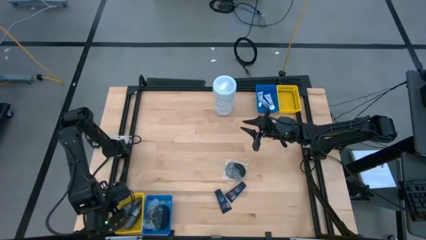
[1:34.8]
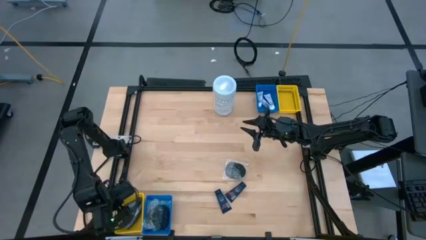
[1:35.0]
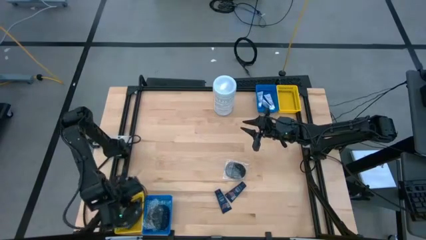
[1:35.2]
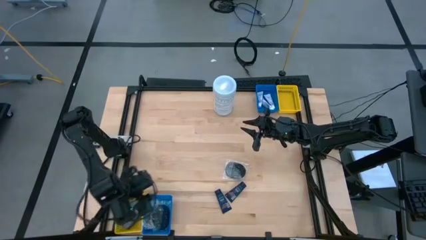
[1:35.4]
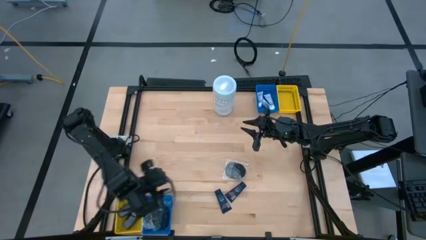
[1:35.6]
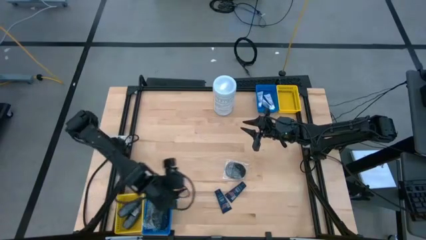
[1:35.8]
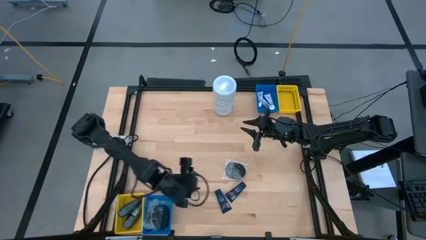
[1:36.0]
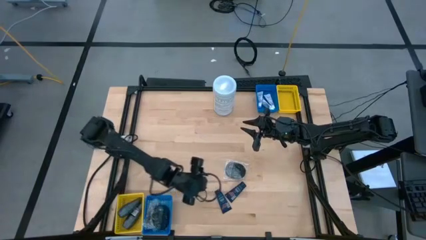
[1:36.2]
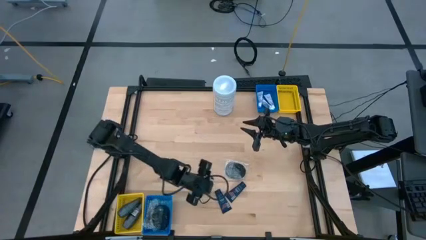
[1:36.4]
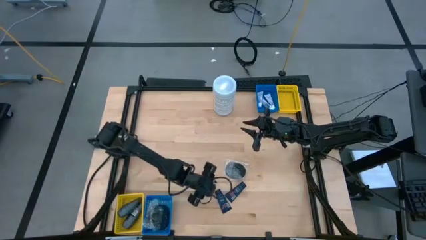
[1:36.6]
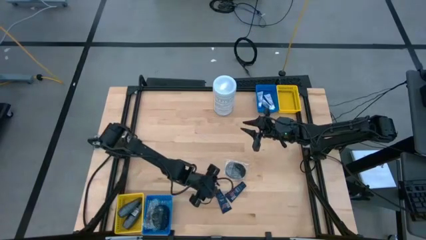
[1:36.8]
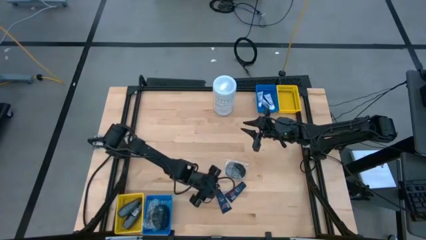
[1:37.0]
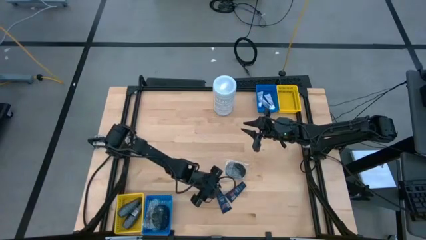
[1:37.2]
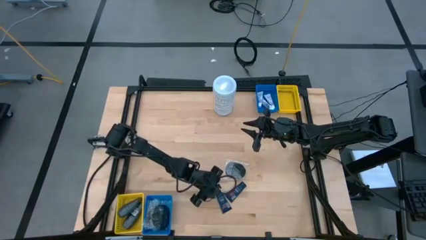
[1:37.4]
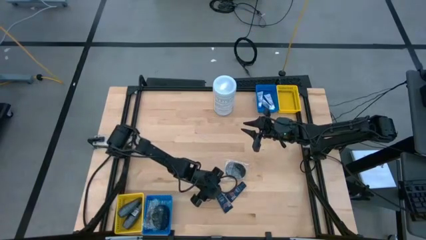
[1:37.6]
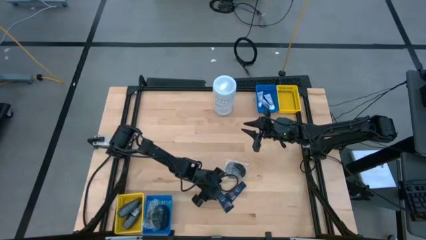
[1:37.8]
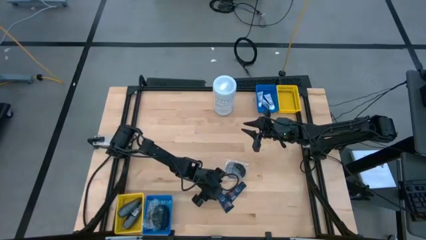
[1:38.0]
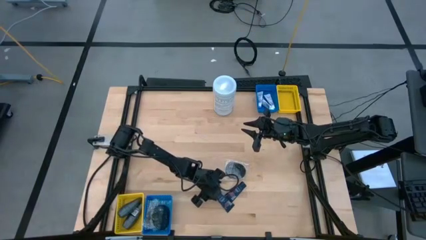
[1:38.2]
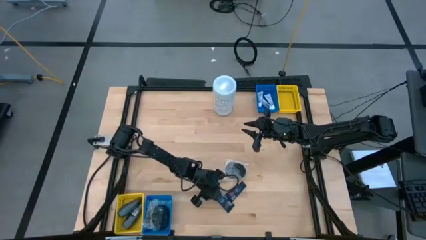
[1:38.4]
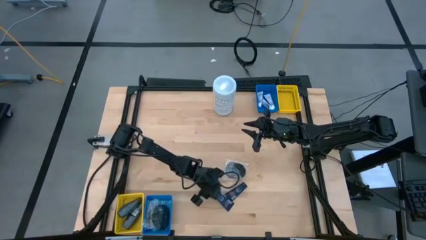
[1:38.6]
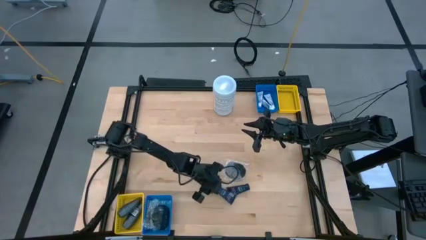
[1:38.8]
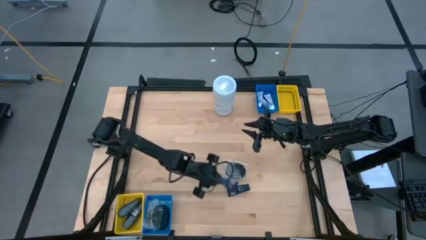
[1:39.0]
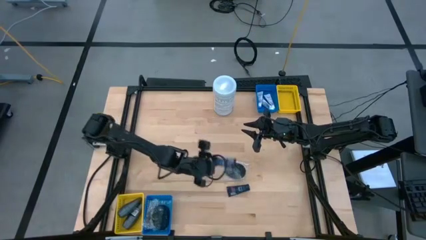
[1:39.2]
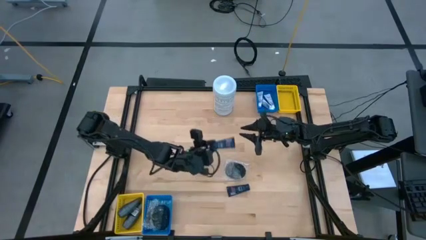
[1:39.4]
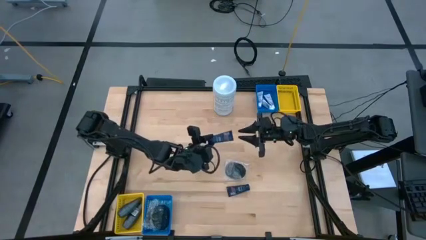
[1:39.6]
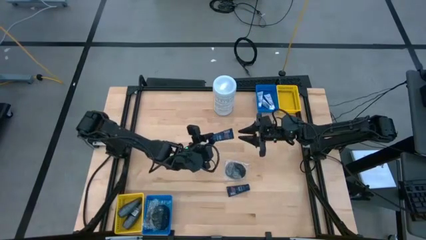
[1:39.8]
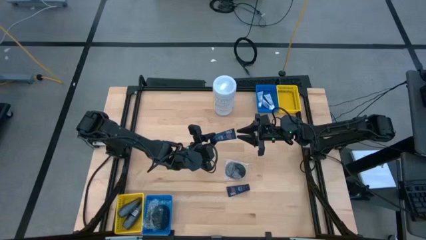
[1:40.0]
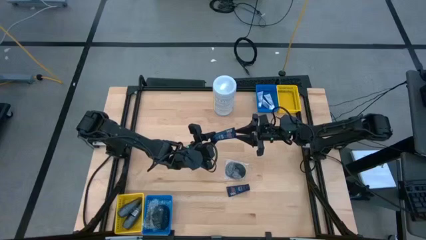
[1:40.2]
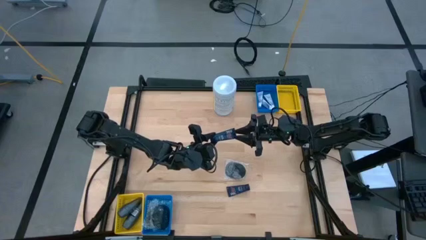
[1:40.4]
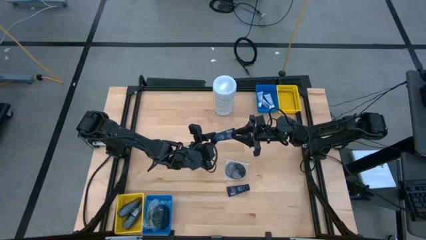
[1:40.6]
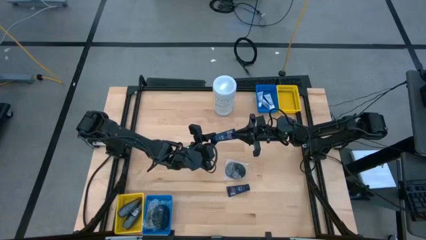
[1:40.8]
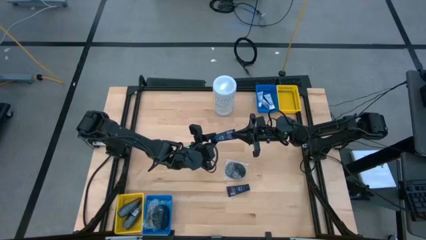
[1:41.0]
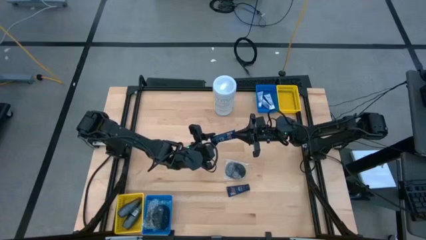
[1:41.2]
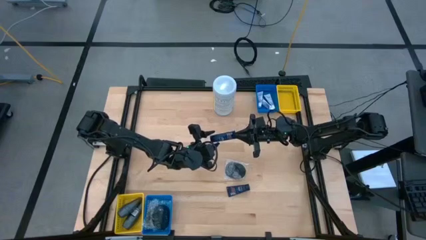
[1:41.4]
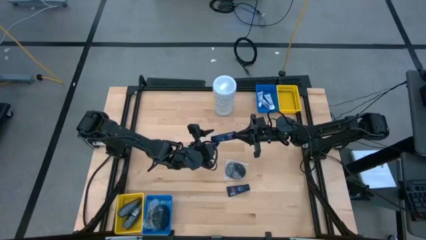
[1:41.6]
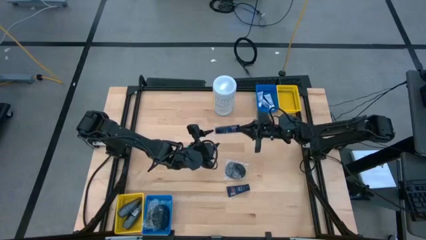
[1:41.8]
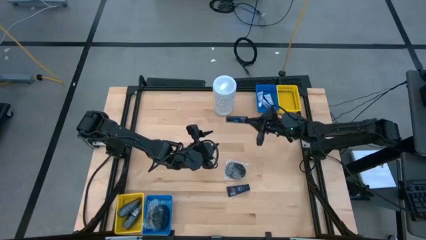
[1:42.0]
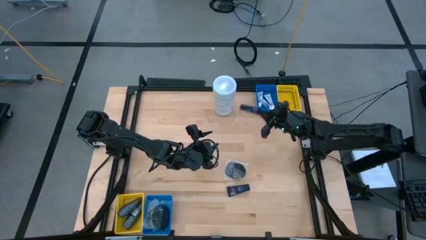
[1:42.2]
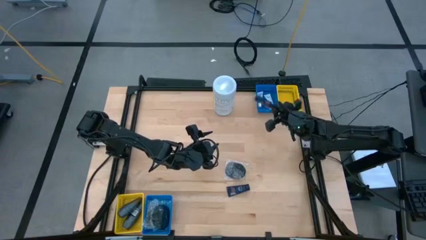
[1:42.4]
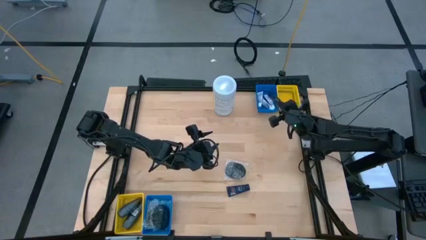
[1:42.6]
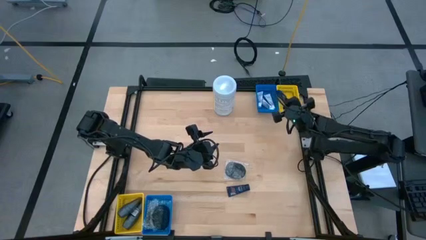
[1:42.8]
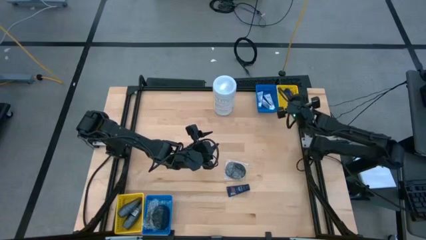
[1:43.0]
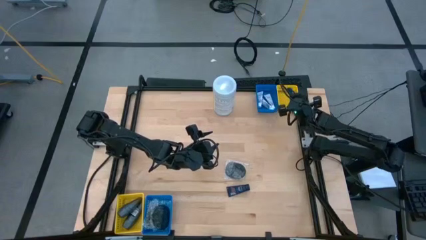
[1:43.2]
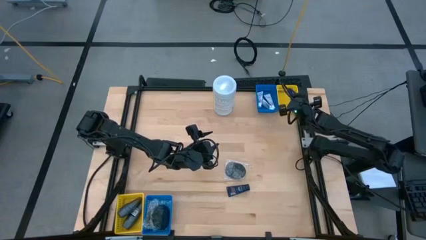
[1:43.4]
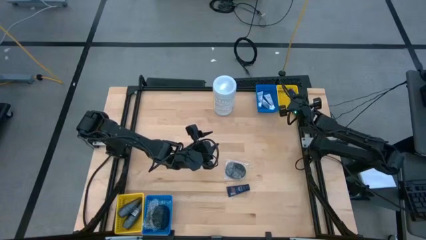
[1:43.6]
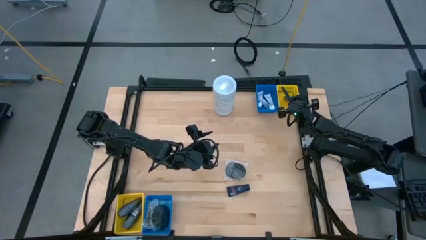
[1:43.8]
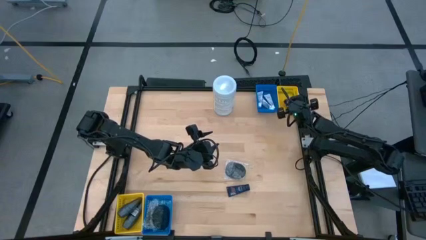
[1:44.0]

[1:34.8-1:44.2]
Task: Pick & Place Travel size toiletries
Put the blue shave cream into the top yellow bin

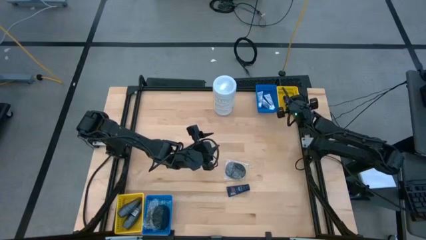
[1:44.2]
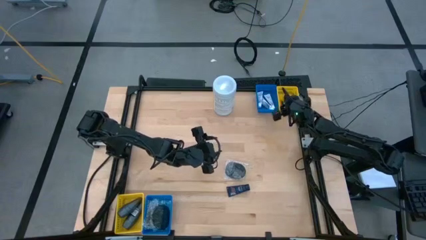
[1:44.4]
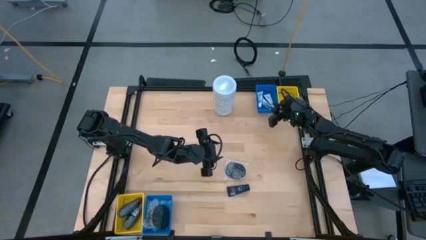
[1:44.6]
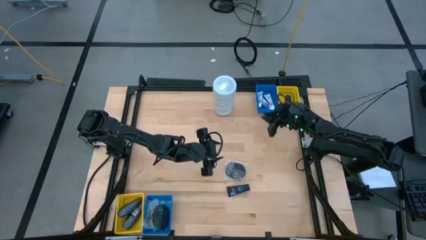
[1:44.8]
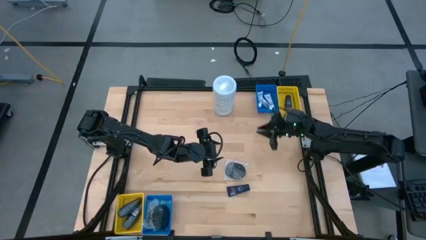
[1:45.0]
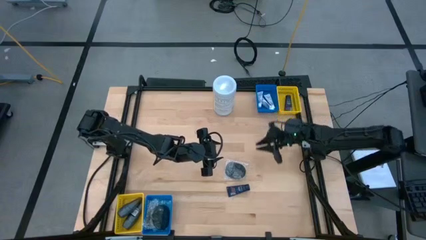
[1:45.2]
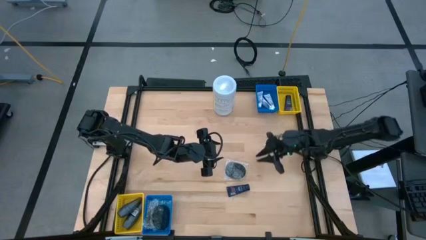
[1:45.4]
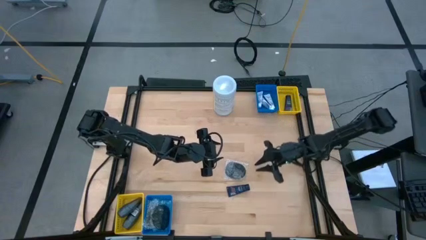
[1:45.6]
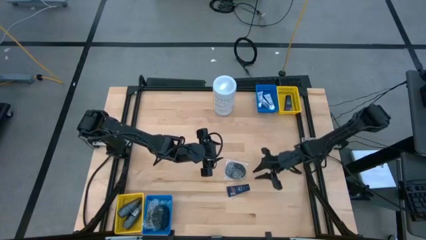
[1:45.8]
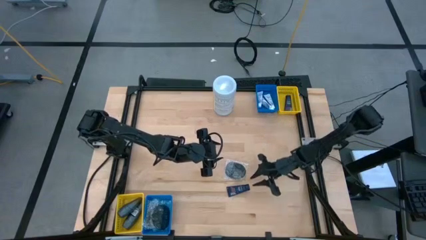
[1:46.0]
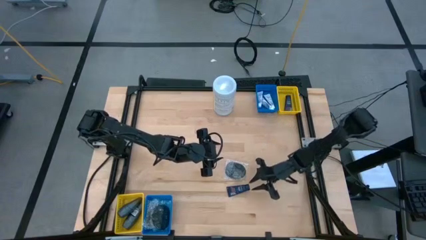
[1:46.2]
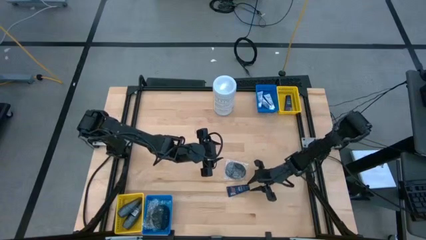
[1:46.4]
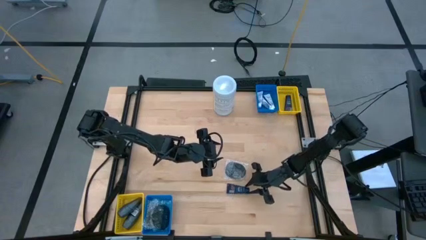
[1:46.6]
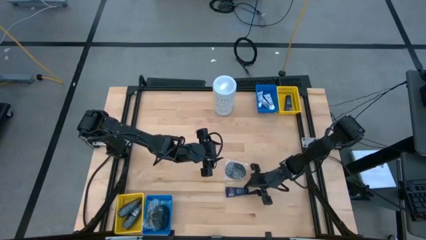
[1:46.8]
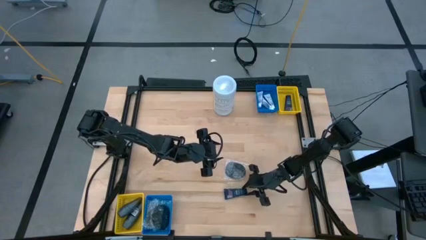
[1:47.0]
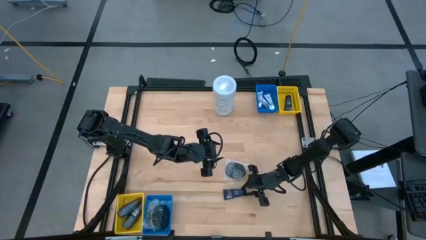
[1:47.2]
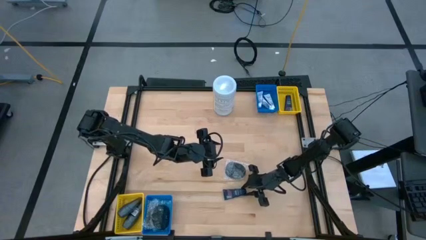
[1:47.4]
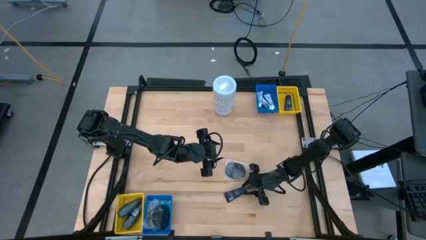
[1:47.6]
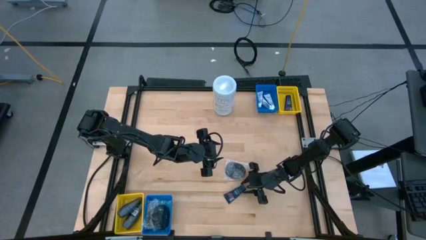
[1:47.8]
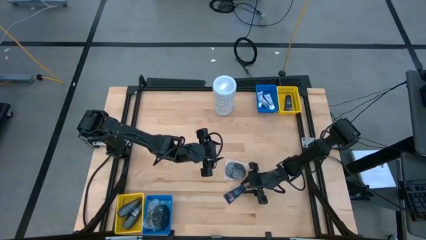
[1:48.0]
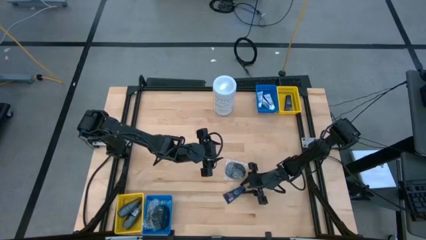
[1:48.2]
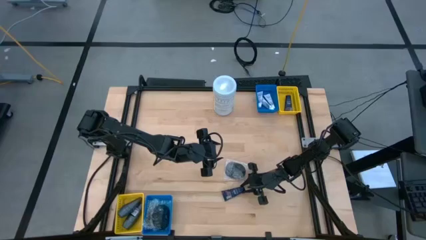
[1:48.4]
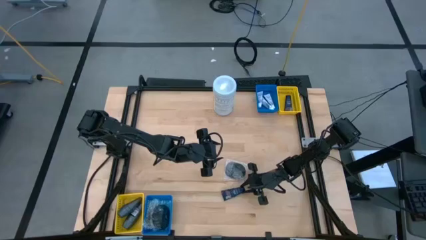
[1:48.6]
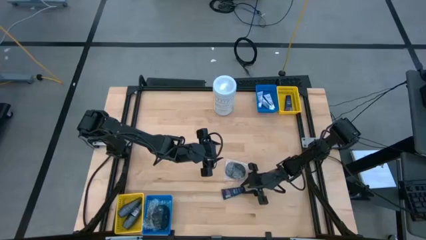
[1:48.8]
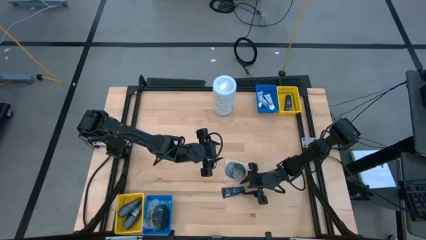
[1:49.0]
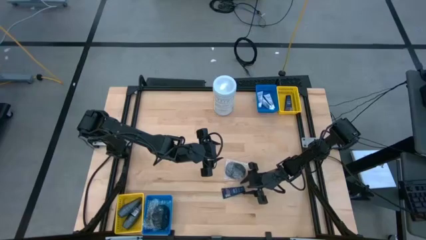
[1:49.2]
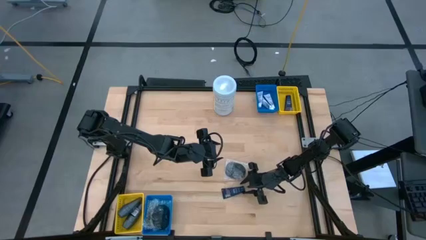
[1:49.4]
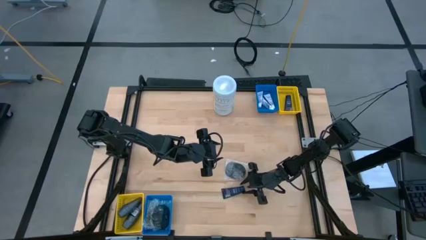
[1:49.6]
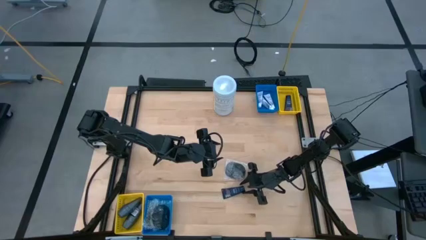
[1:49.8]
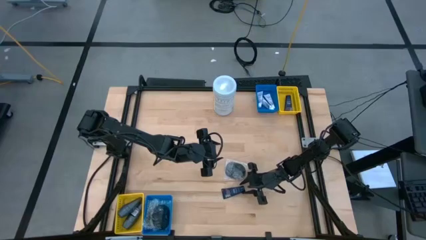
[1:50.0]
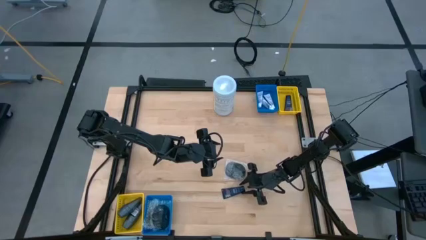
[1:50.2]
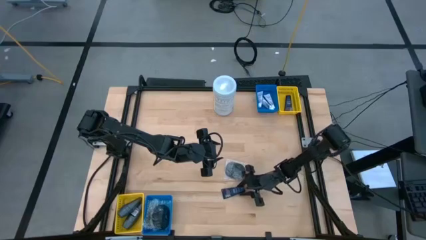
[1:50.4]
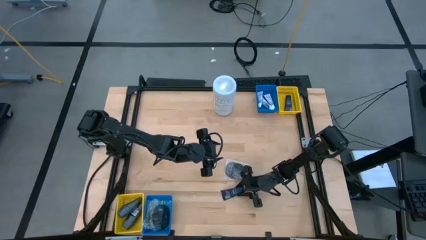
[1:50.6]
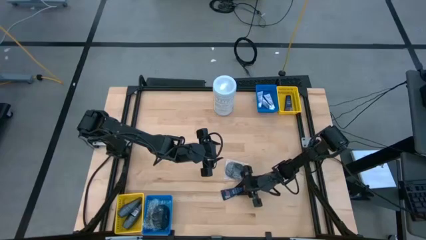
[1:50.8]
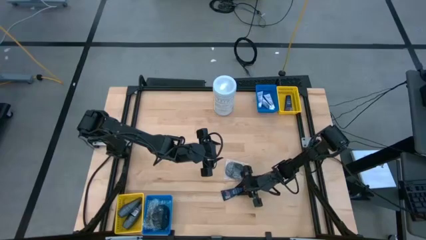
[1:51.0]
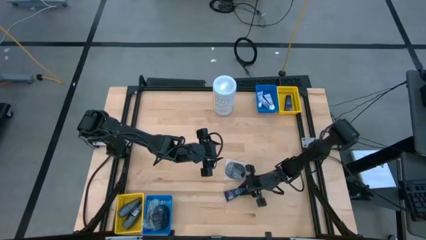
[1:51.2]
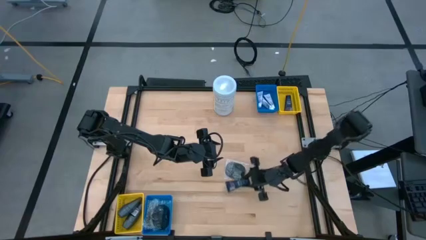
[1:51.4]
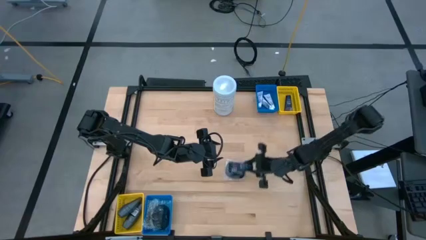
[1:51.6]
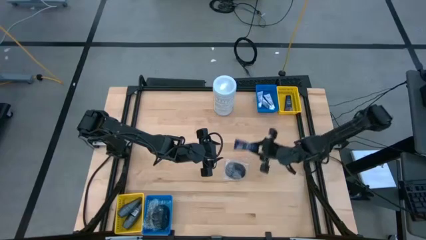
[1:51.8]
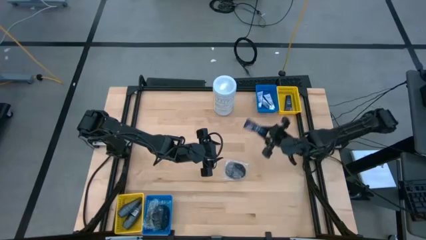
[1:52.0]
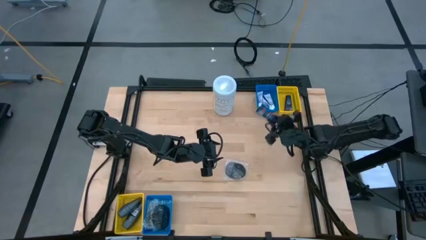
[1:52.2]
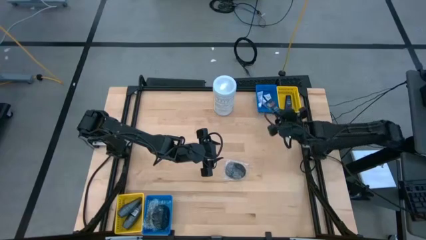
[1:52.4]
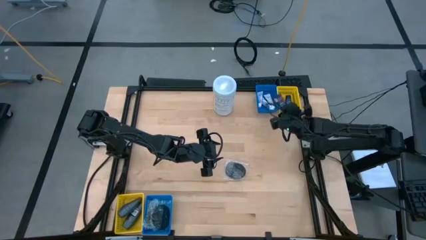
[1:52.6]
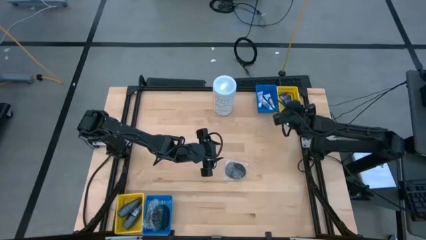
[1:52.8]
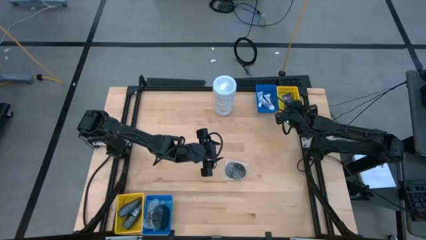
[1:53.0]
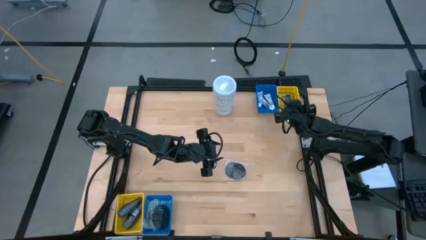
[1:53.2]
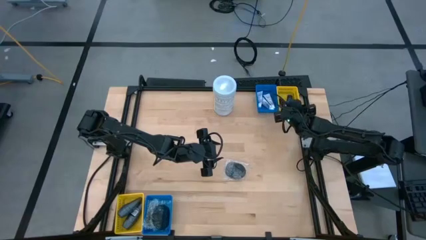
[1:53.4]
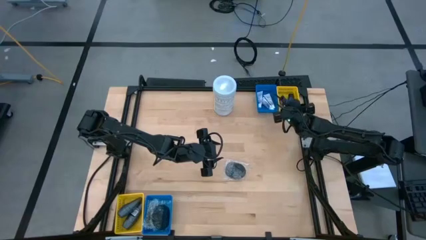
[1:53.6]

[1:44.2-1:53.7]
Put the blue shave cream into the top yellow bin
